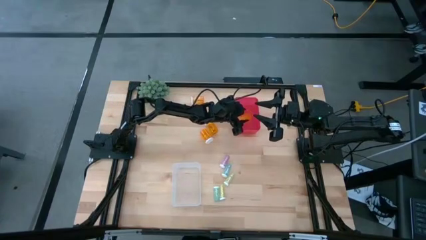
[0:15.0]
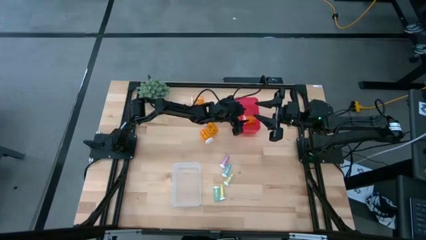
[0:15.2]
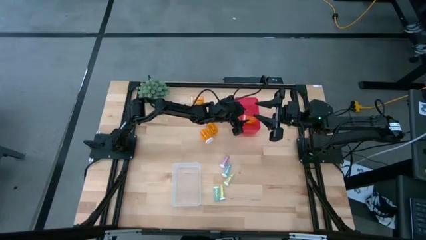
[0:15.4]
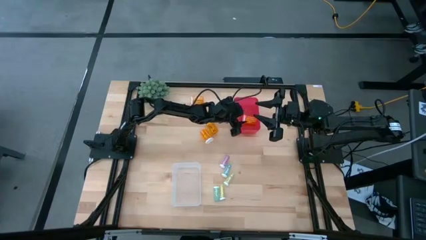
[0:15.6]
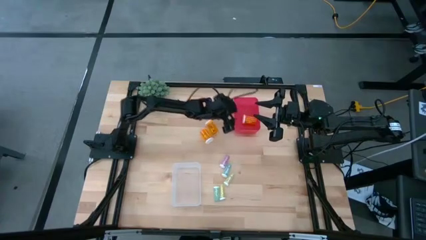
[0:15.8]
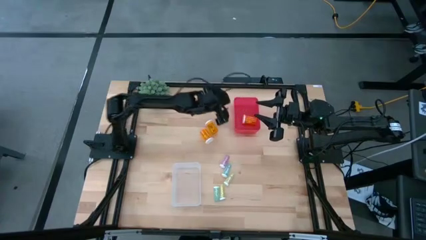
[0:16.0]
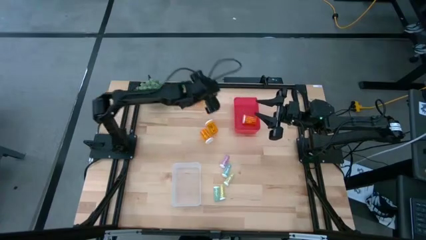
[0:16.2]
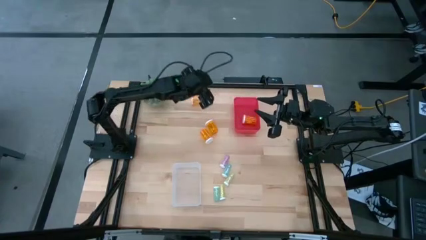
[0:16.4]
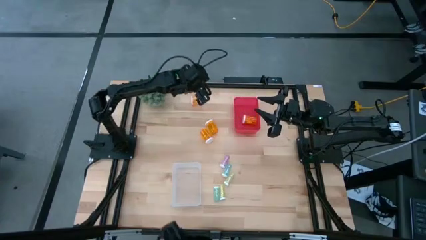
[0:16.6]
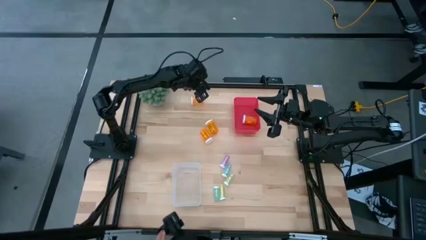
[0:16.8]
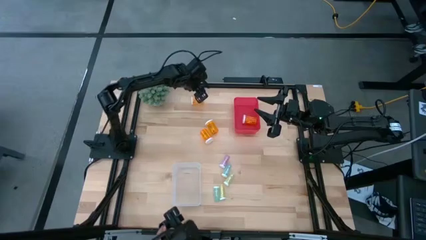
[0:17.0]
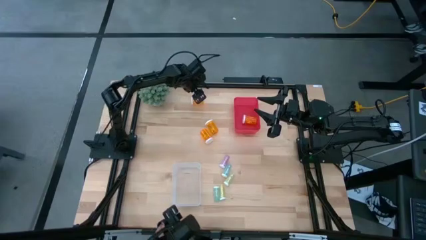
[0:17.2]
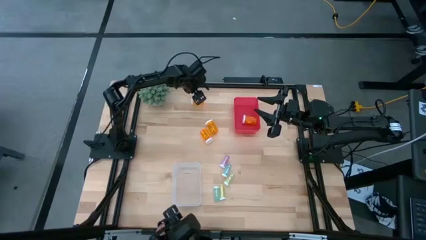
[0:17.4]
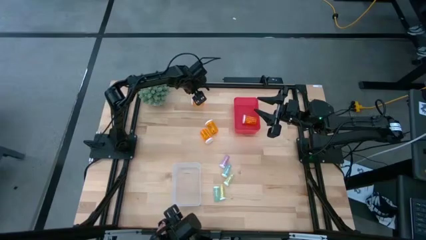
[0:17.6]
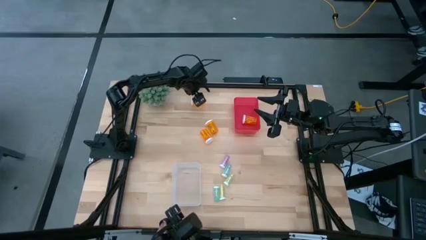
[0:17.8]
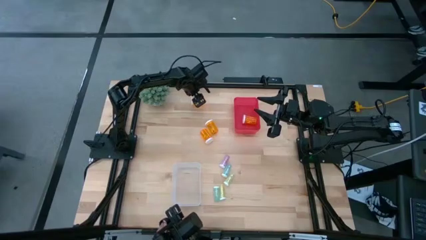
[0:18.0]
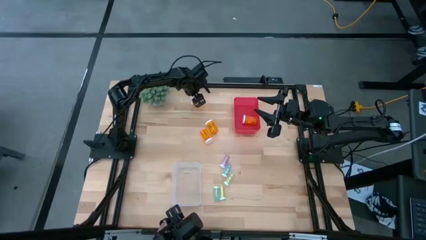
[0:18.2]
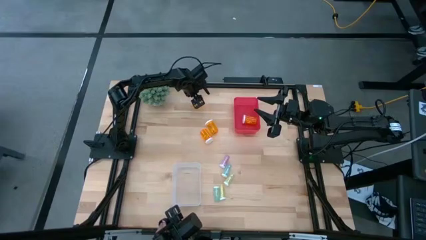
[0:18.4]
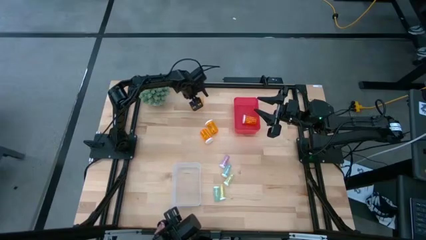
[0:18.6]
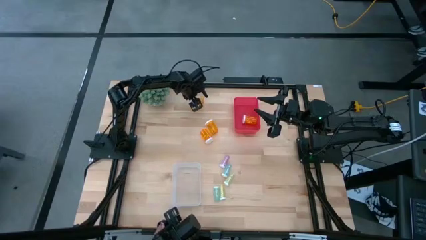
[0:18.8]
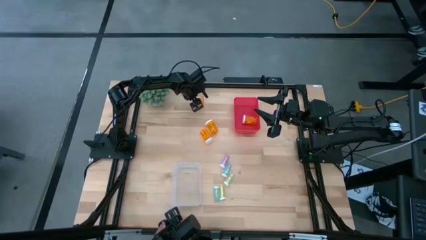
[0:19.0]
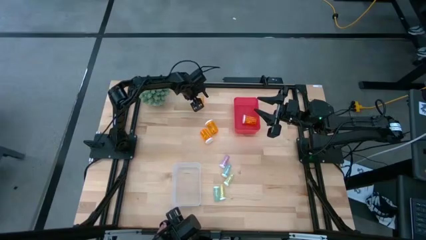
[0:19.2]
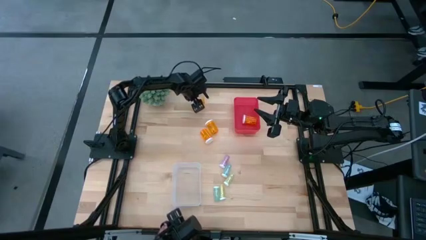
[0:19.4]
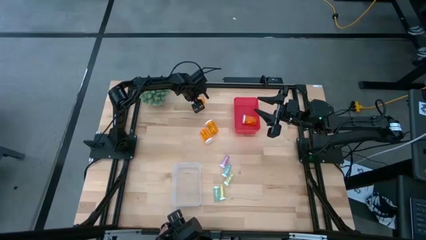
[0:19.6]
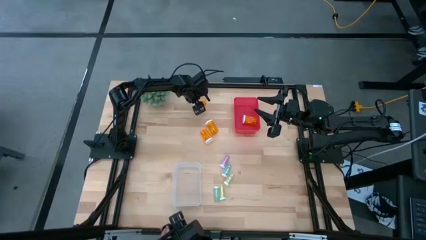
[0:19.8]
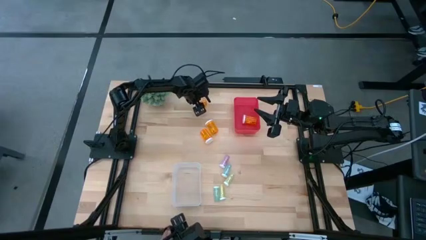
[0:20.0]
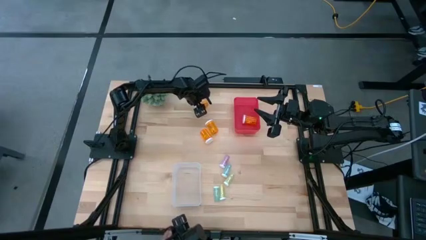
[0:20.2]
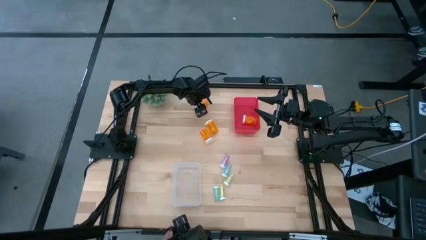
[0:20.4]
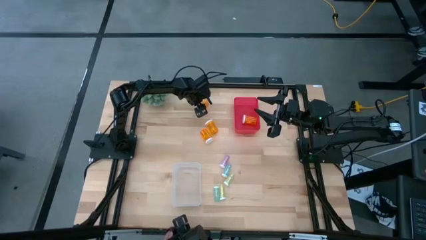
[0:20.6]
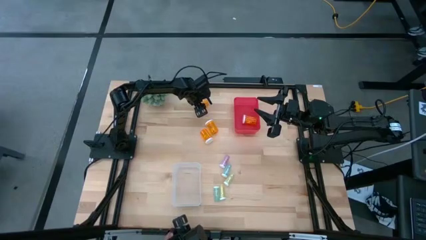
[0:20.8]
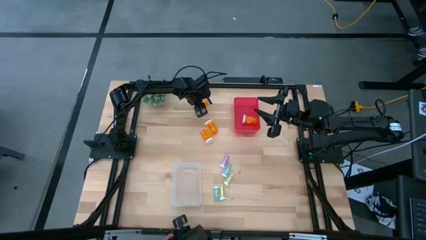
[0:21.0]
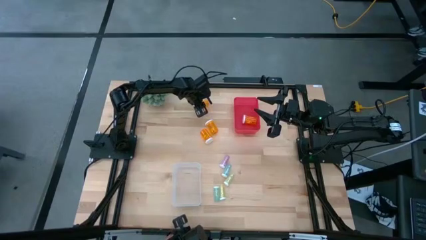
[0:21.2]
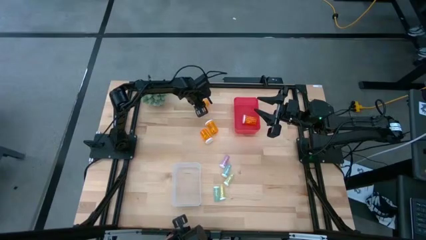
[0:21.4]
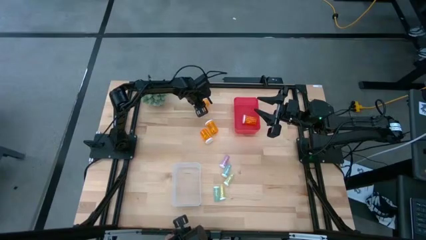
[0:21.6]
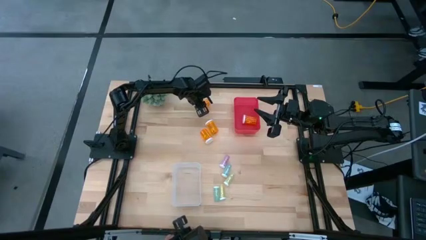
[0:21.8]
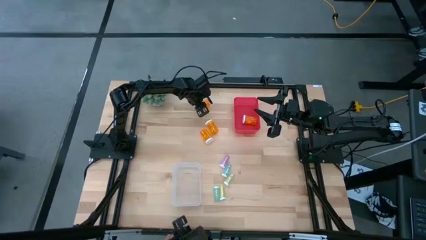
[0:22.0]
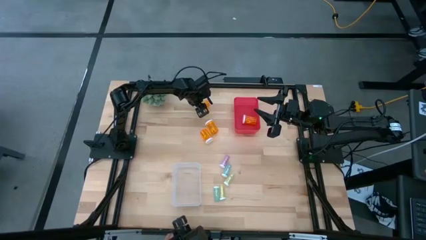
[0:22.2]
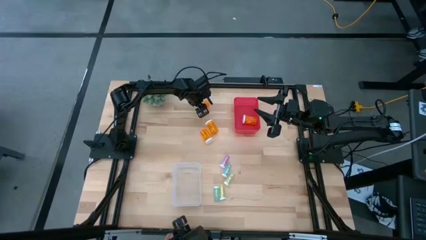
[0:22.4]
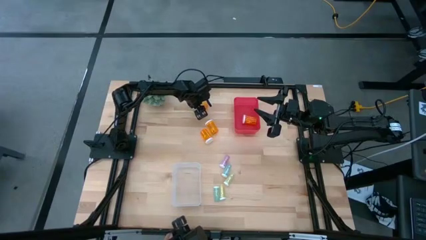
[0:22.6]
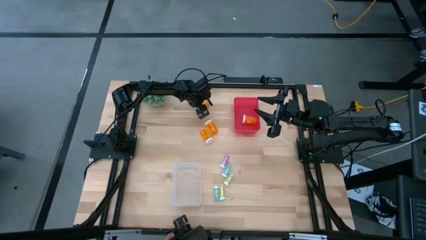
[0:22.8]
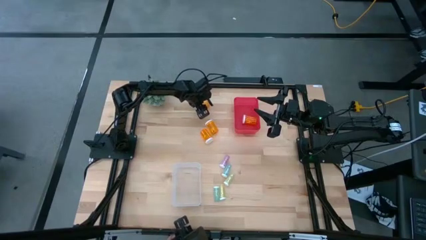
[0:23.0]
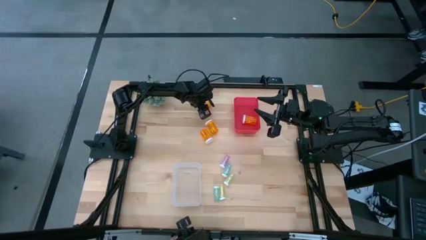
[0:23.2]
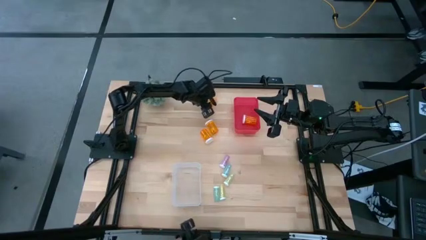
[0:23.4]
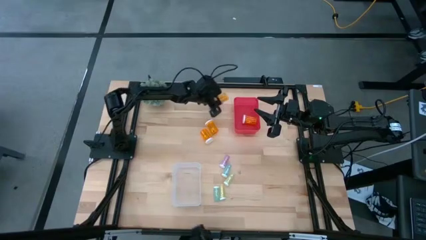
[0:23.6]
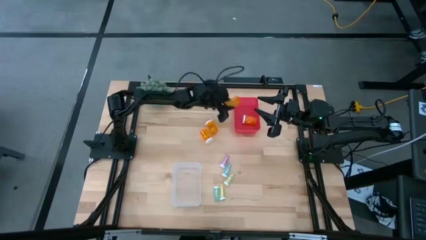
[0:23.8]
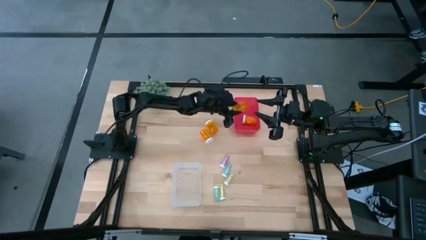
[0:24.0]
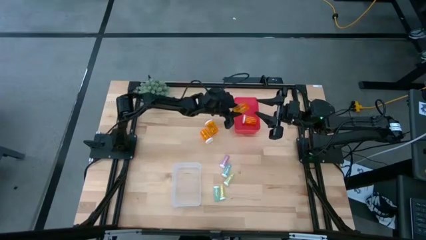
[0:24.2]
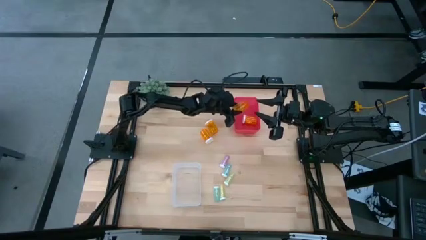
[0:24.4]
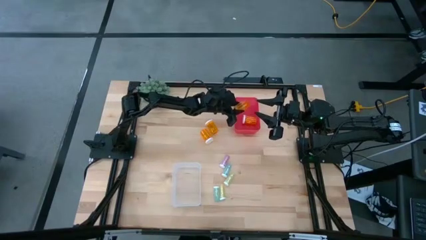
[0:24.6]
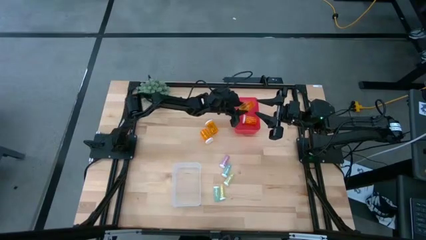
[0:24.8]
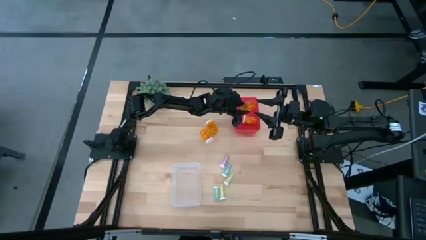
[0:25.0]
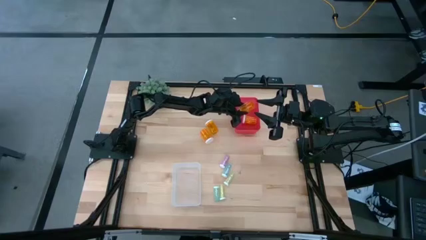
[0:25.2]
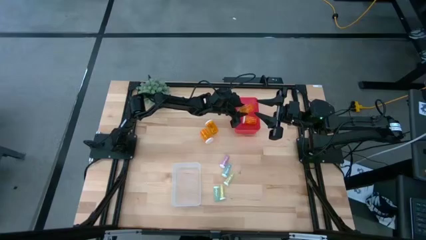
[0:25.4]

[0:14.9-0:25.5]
Task: Pick and place medicine bottles into bin by pill shape (circle, oval)
Put the large orange pill bottle into the red bin

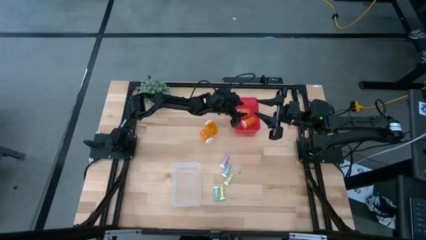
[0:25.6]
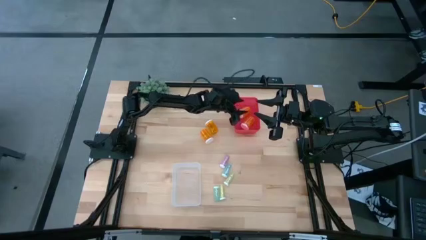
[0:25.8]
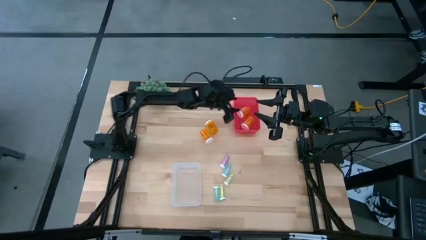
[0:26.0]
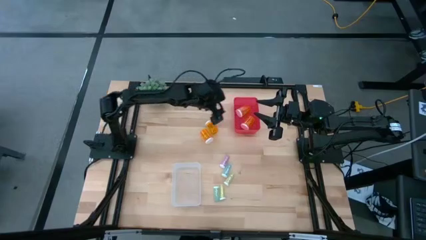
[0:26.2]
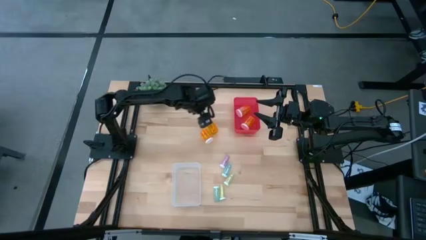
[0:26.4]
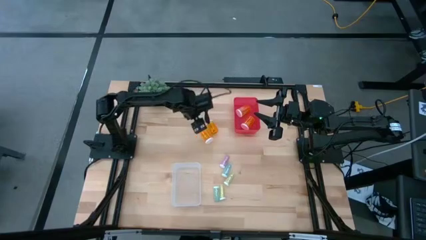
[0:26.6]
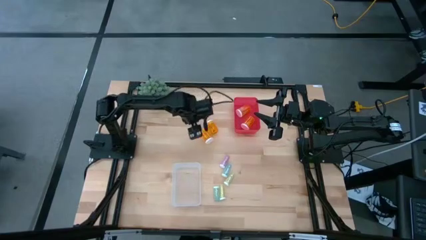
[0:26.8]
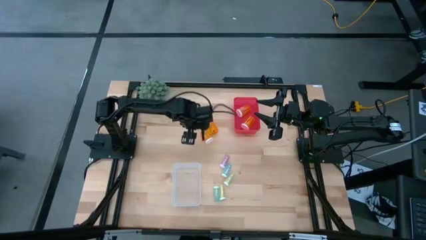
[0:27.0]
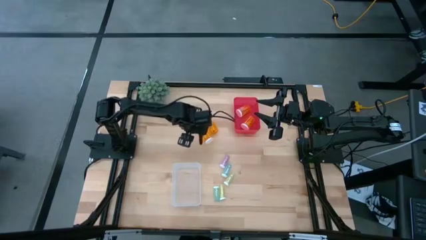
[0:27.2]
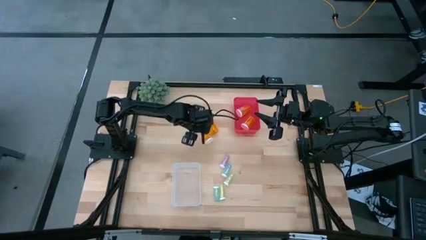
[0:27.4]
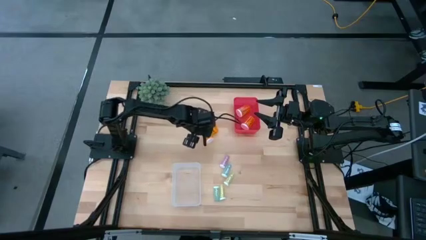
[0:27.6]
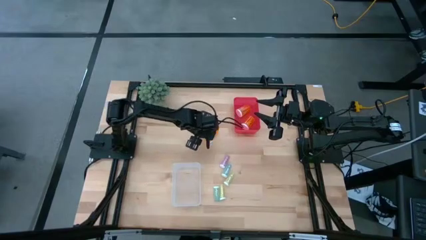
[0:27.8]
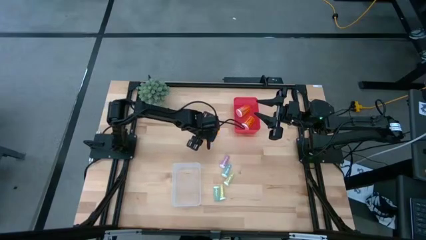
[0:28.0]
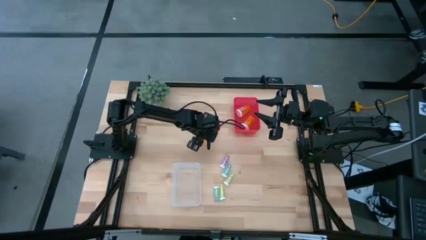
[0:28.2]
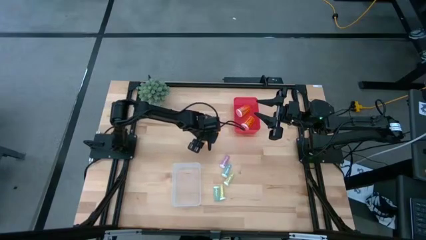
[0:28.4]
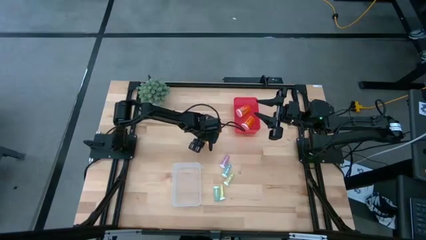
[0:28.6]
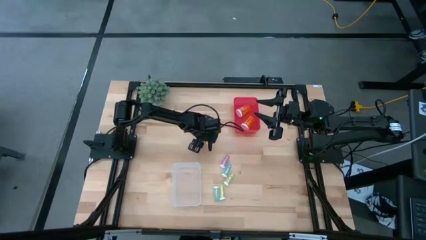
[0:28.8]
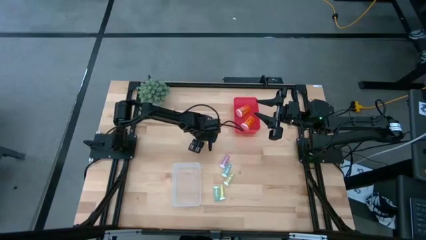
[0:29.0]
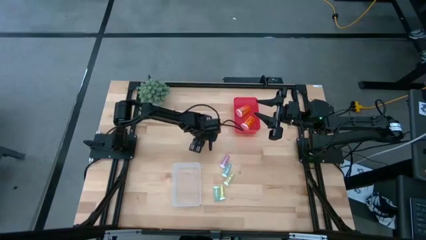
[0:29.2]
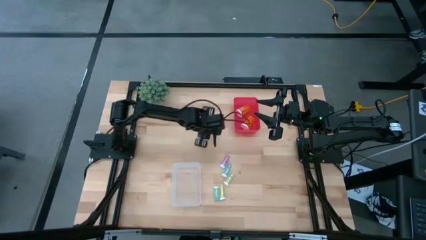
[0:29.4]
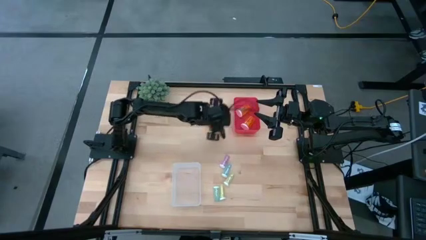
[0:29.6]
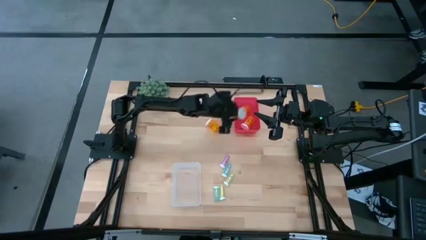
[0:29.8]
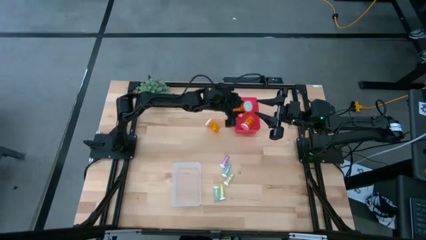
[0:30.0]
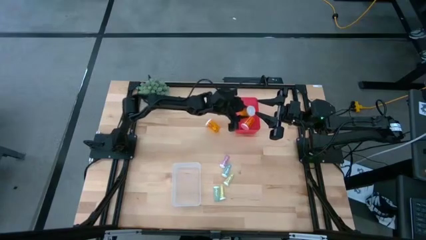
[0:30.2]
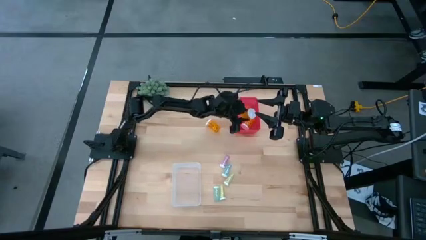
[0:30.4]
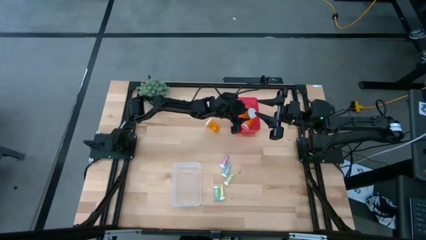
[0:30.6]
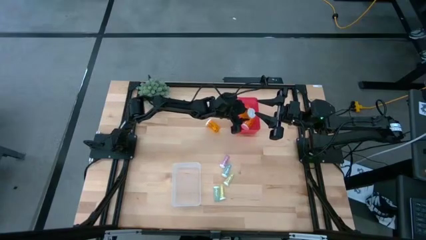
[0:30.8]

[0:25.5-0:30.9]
Put the large orange pill bottle into the red bin

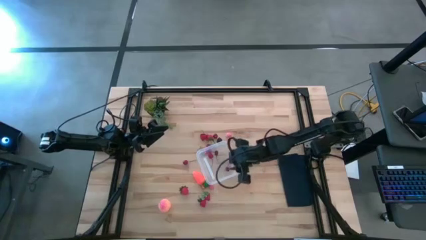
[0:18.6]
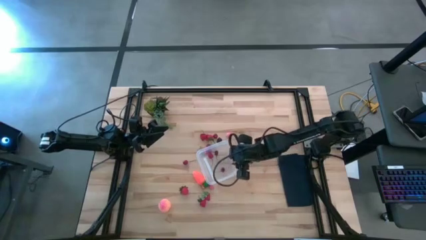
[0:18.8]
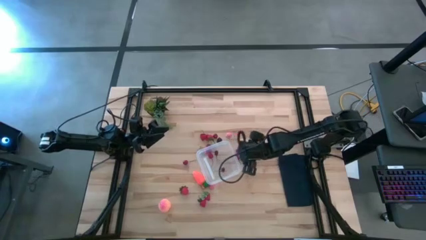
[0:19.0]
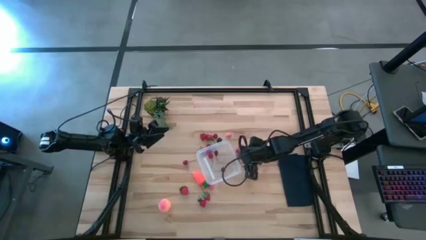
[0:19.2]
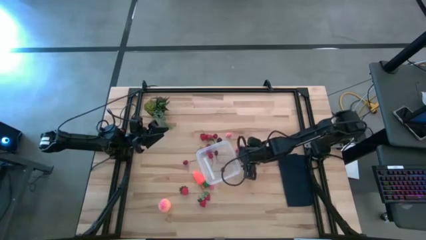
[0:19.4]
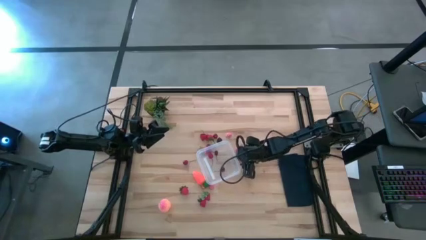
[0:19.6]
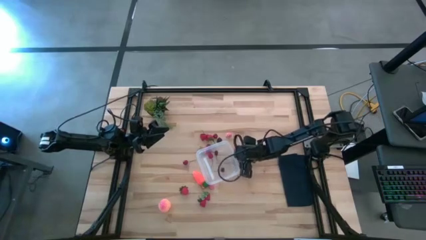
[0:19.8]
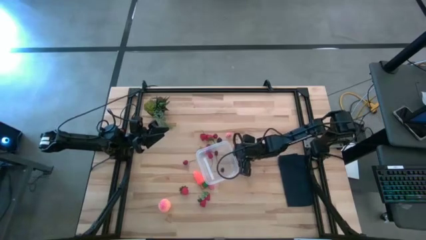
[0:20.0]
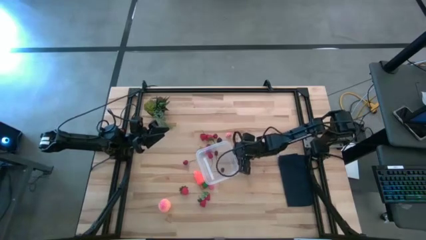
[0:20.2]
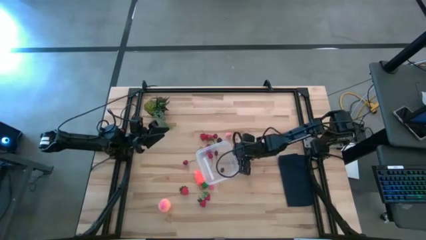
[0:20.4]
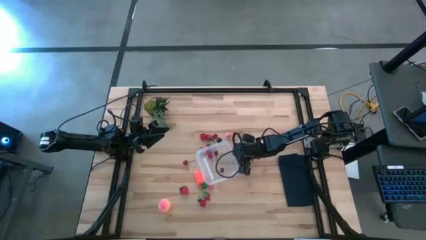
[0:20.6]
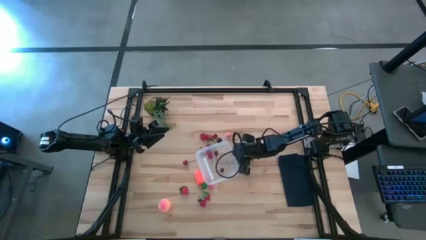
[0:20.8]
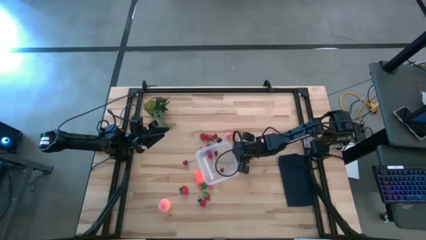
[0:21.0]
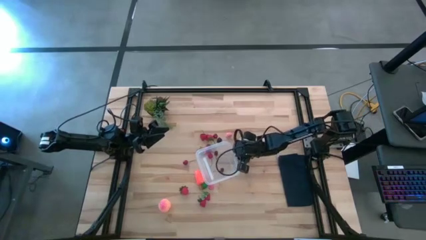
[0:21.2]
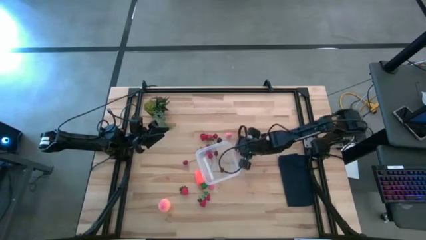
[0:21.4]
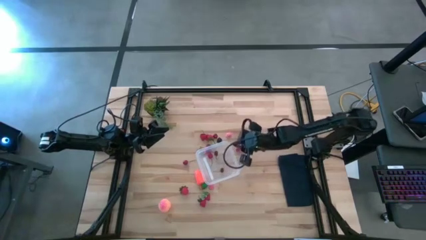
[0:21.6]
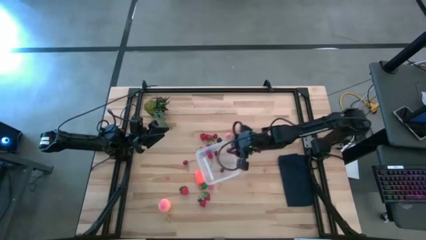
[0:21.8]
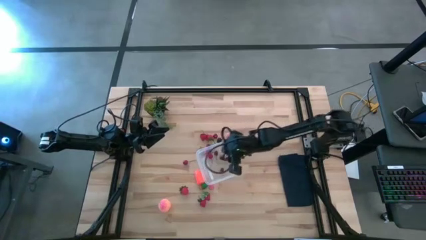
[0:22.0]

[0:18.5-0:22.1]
Task: Pick and placing Produce into tupperware
Put the cherry into the transparent container
